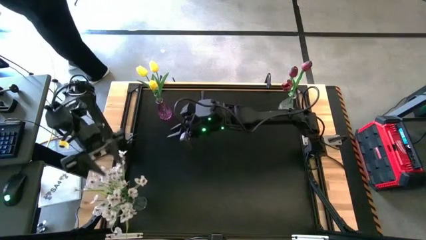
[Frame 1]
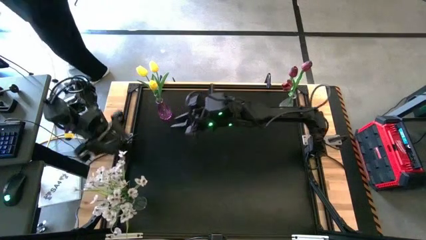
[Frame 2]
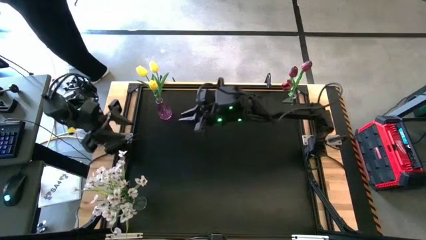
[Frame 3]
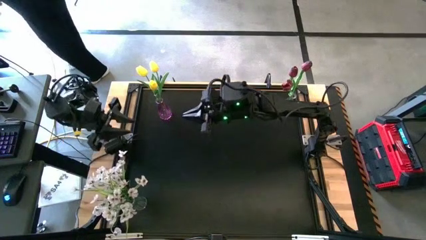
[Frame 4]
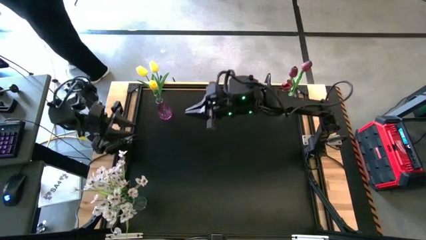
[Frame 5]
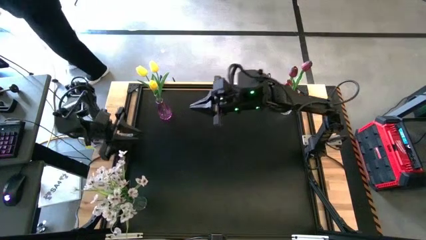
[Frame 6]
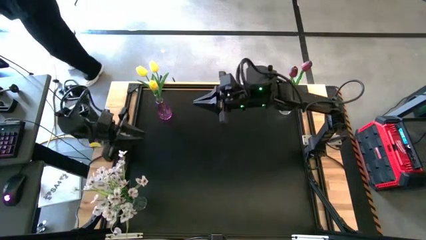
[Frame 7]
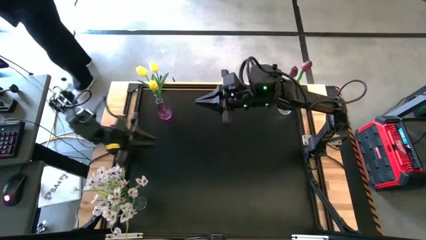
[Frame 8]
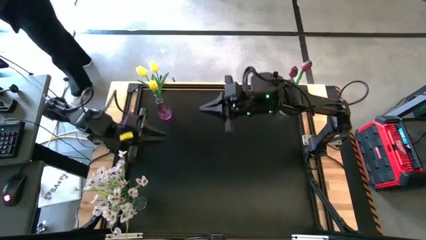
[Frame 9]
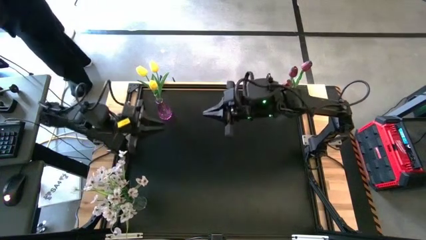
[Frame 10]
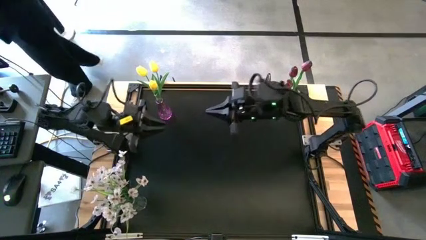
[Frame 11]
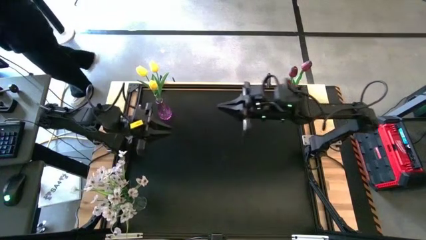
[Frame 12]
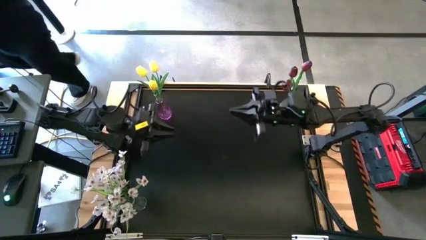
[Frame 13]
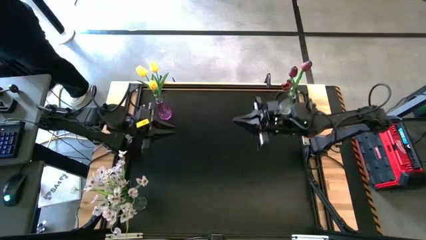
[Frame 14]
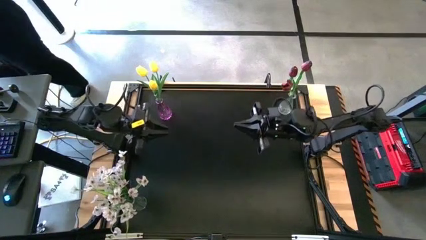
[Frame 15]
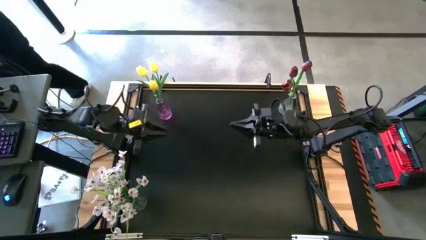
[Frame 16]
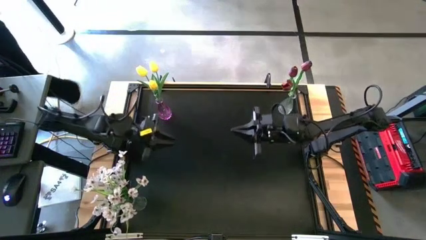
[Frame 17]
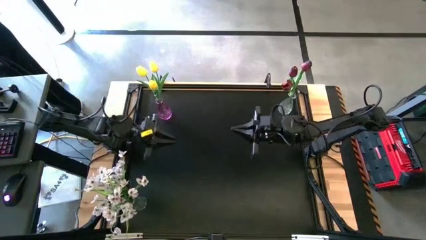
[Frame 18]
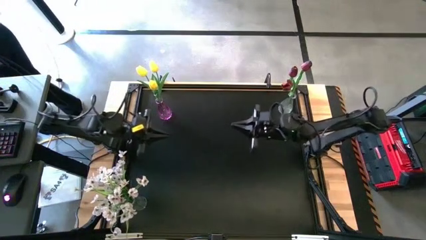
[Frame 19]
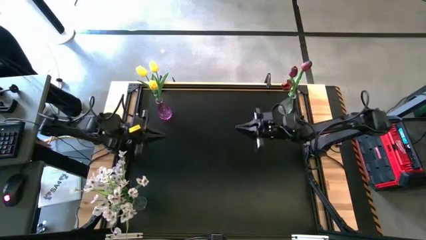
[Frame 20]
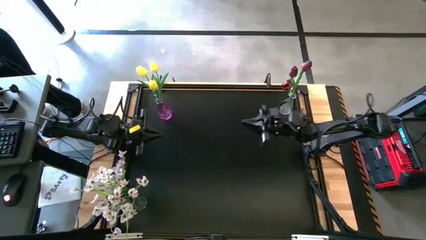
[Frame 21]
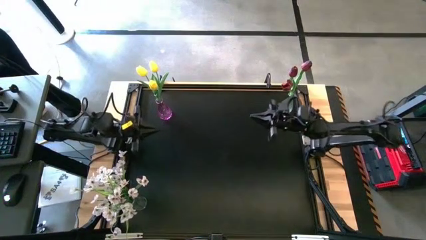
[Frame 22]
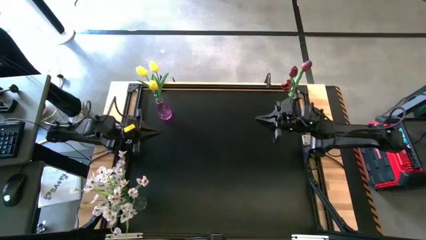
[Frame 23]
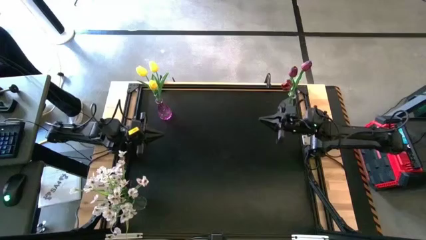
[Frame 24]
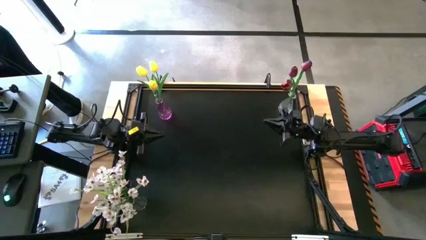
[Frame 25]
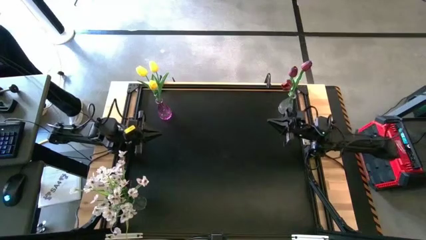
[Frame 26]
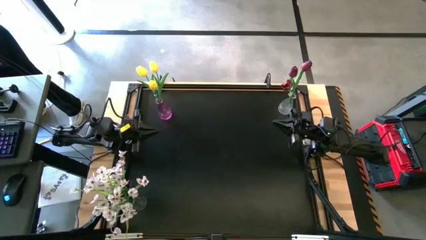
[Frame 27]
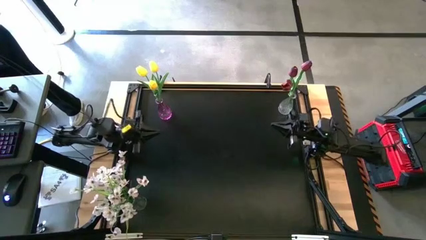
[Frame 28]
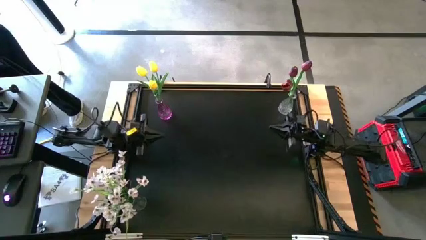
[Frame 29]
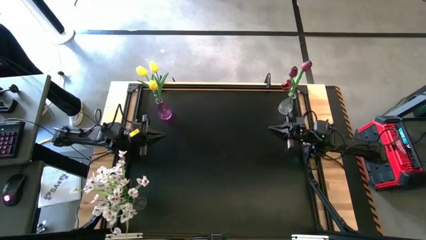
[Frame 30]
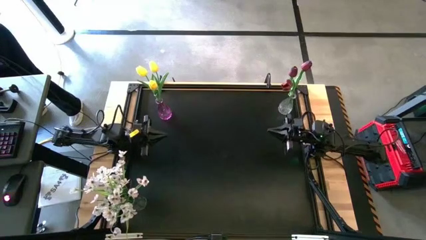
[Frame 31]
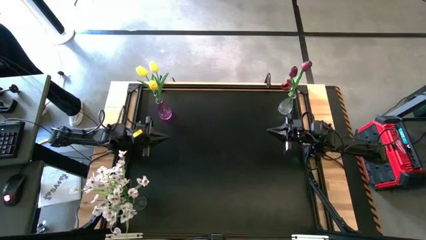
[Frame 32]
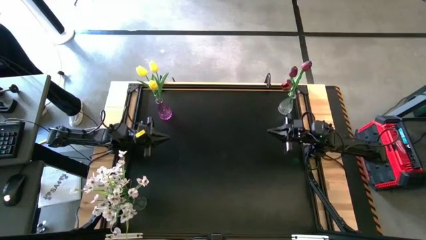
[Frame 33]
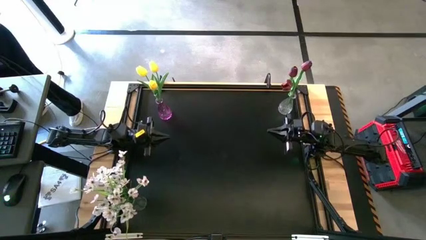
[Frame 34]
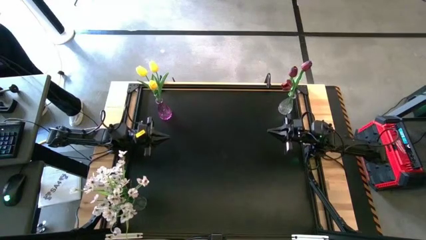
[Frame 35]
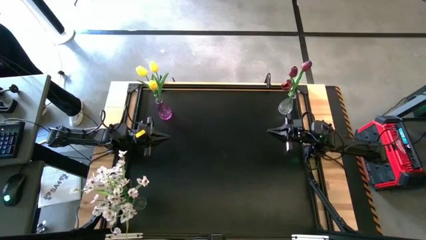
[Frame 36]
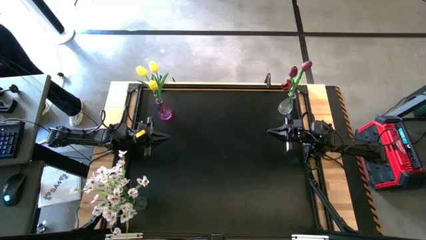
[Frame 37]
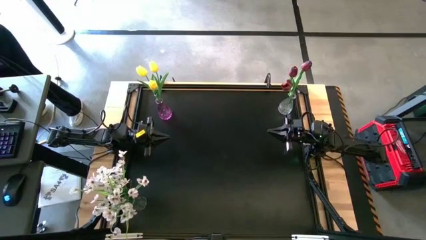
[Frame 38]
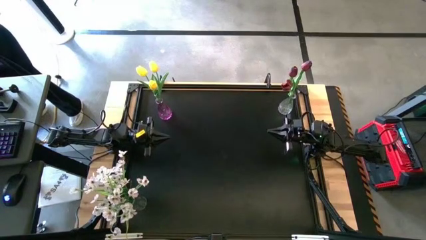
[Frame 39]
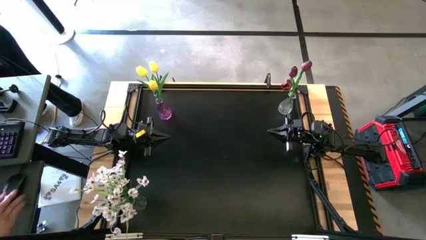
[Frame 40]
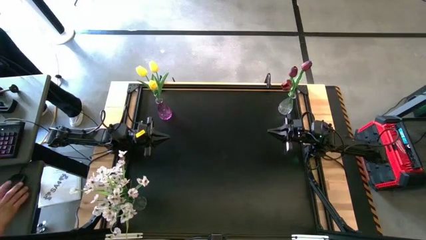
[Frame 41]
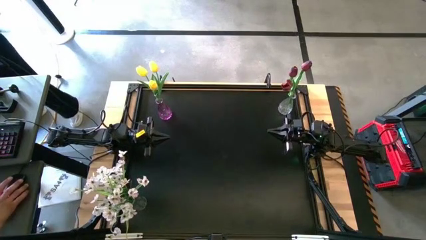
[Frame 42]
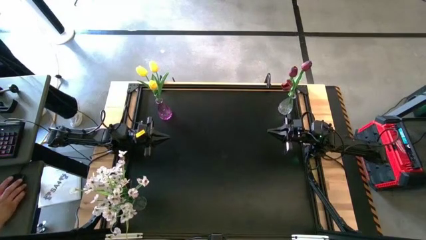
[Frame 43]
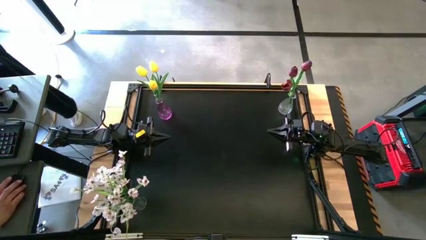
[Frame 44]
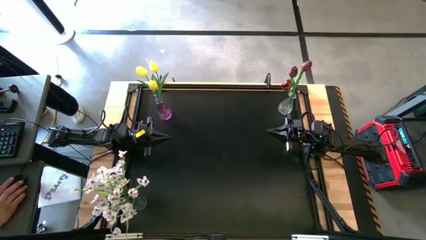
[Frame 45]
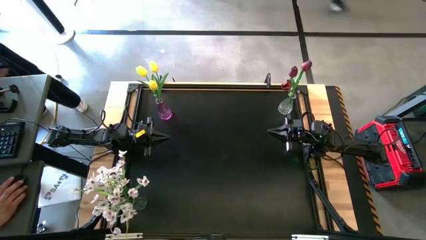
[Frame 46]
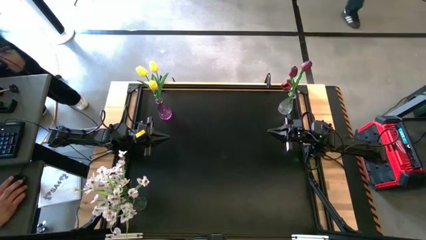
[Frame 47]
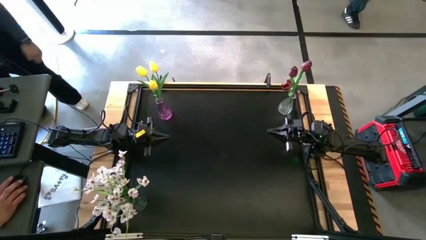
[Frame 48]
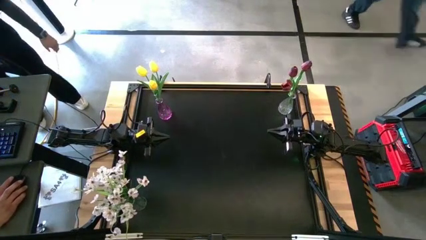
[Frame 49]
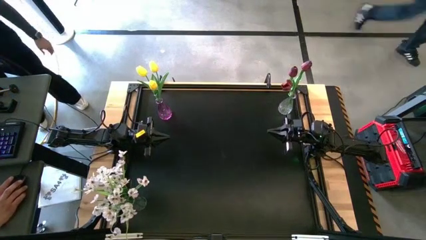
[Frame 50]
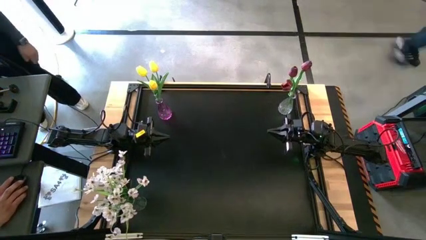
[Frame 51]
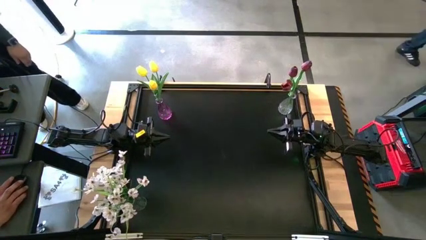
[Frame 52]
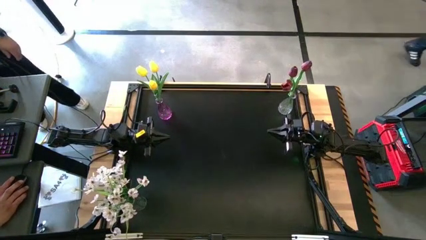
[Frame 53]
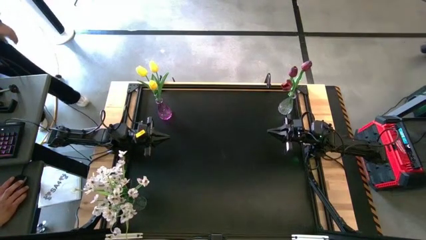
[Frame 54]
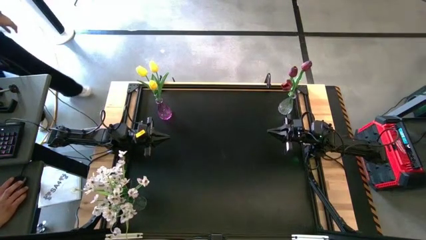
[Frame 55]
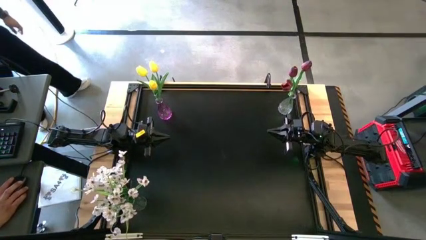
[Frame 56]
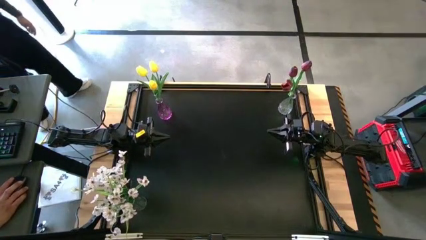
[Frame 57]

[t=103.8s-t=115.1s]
Task: Sort flowers into vase by color
Return to Home Position

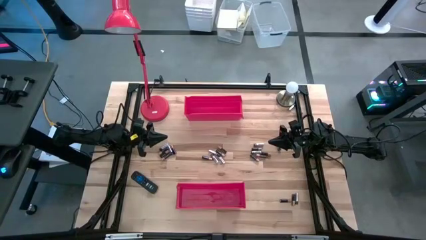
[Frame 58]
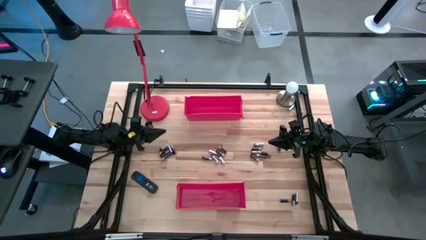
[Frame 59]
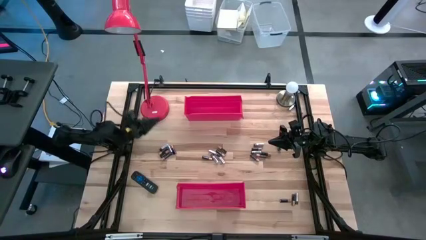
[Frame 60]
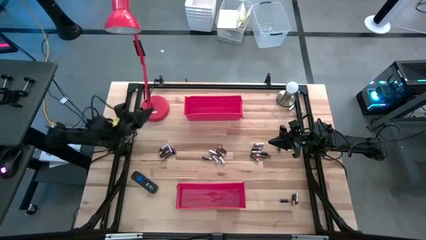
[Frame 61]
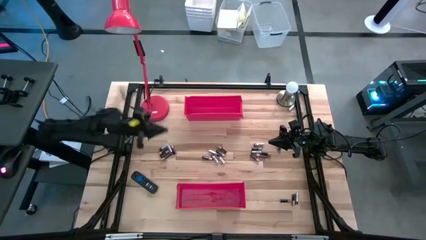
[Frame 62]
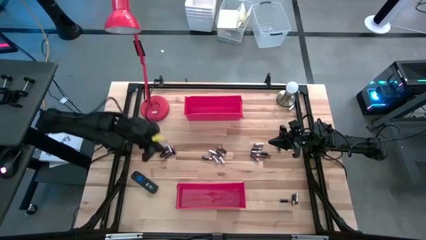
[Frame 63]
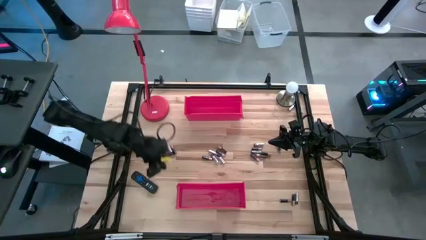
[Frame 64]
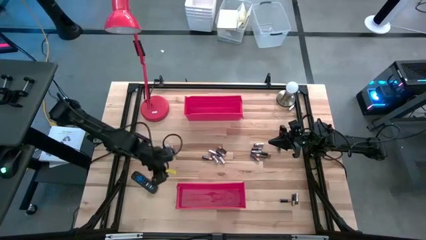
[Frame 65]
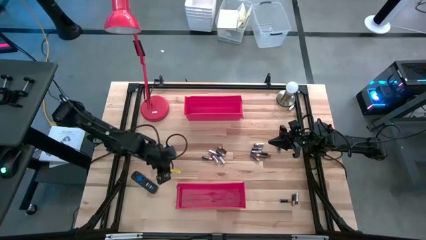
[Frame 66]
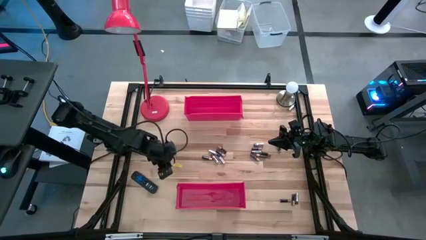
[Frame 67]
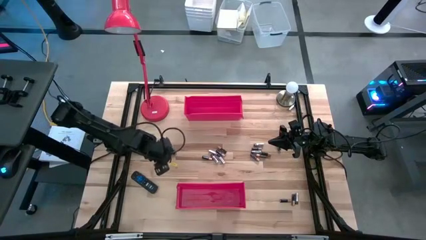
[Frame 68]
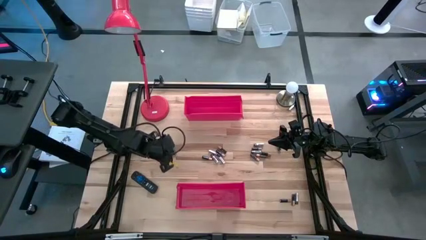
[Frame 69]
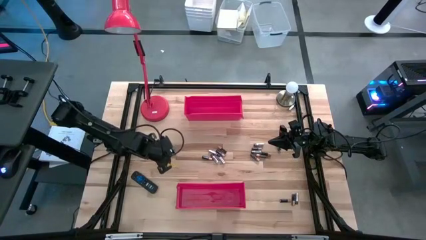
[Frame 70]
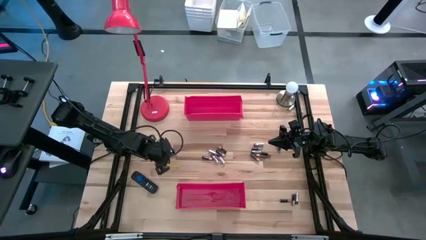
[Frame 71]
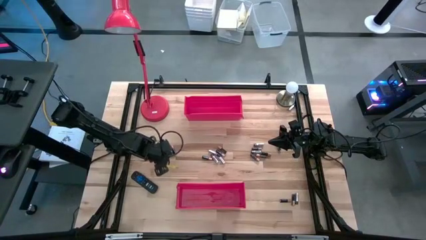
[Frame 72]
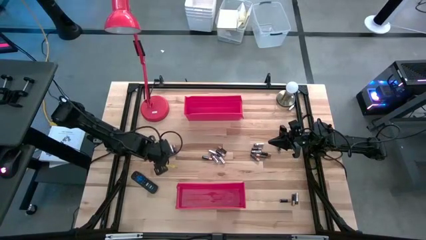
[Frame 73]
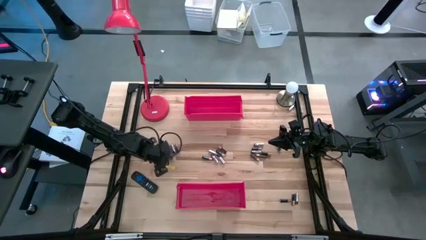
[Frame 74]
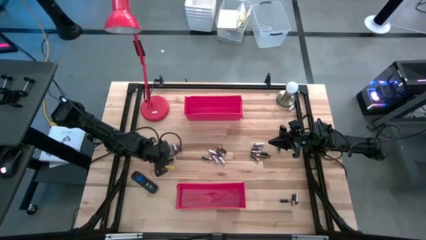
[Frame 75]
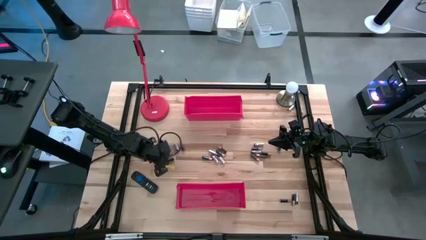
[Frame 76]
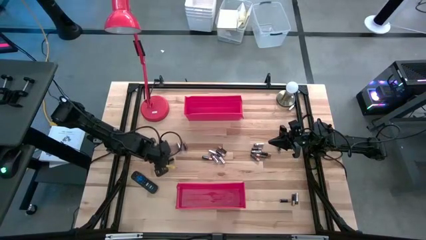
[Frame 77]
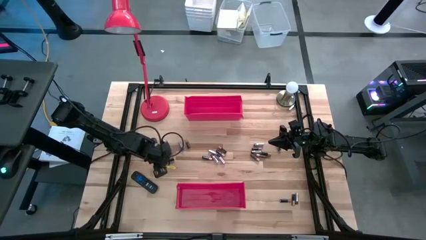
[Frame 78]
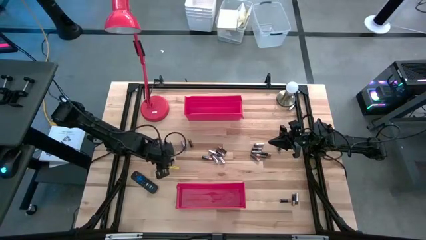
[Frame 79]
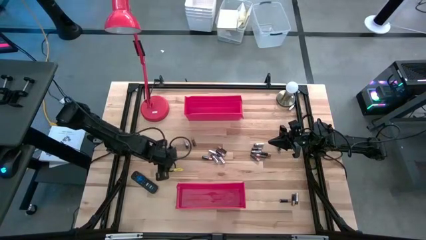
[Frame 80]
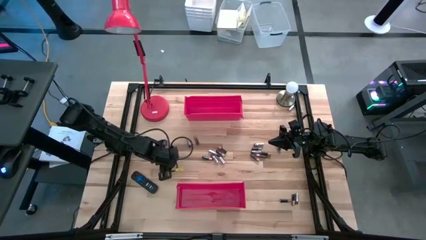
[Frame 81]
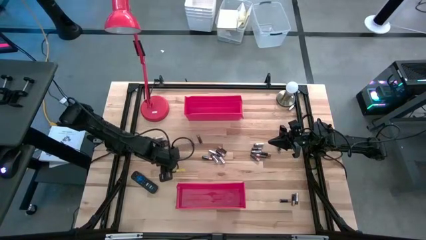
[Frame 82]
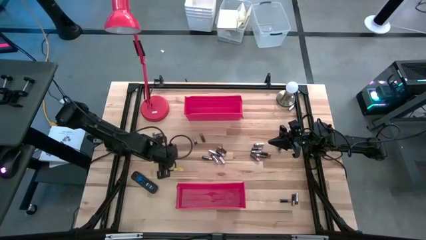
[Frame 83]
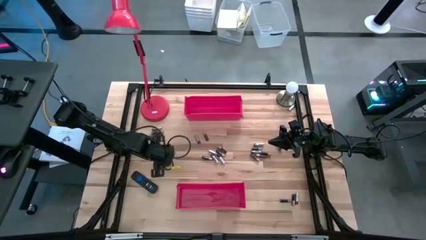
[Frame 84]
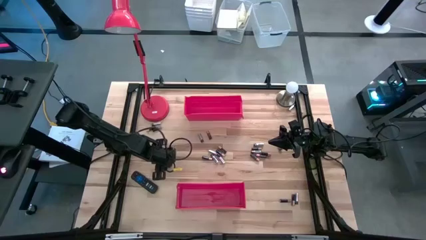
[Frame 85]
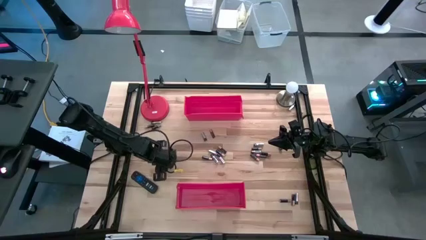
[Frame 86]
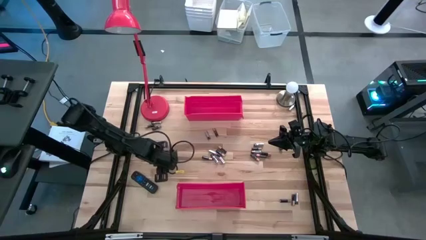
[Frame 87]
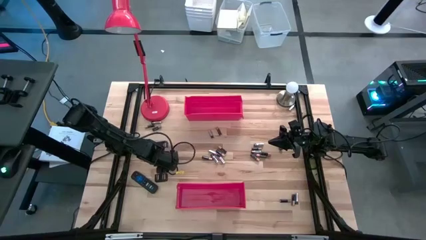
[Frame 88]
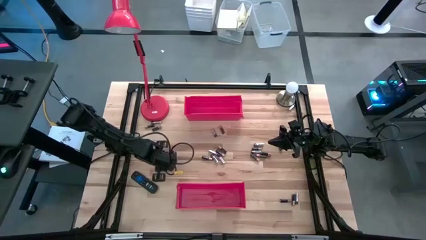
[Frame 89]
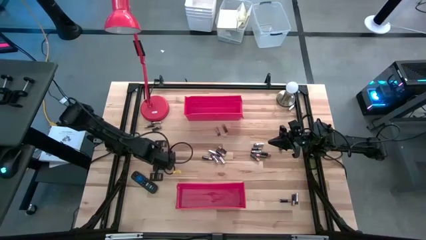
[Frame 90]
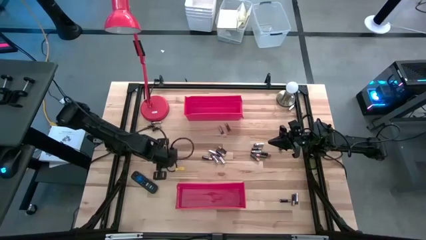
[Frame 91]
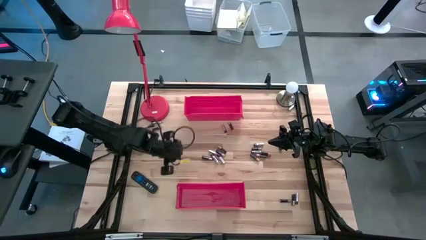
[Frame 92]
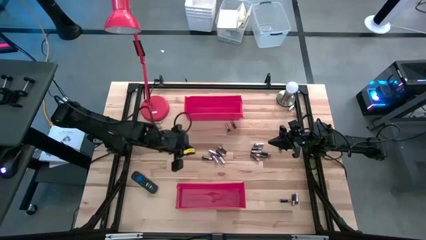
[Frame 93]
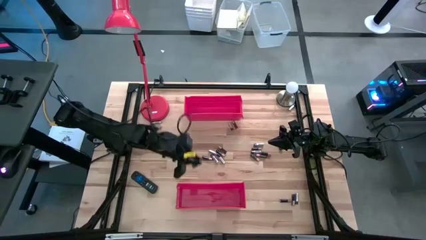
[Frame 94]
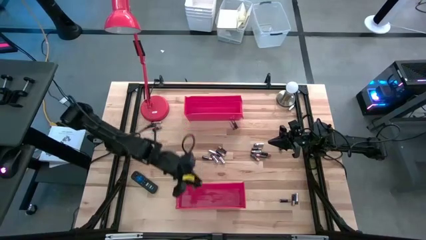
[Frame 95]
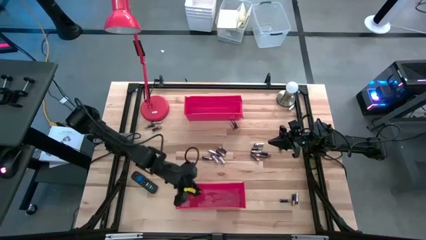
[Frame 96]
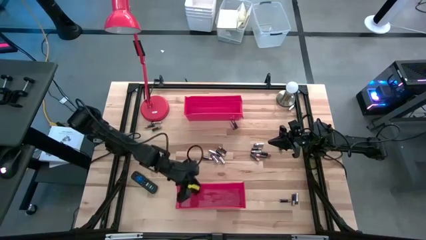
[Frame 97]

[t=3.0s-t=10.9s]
Task: Sort batteries
Put the brown battery into the bottom red bin
